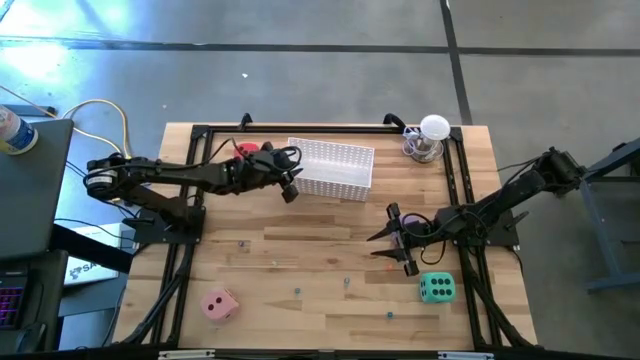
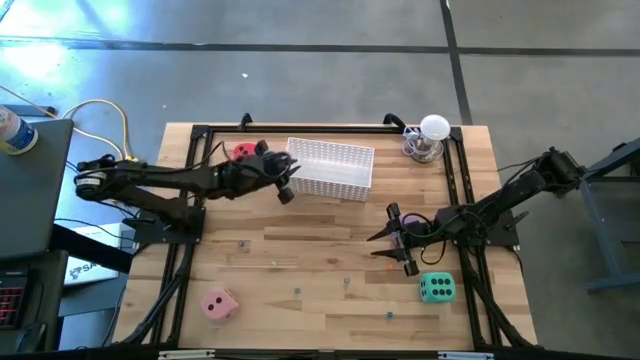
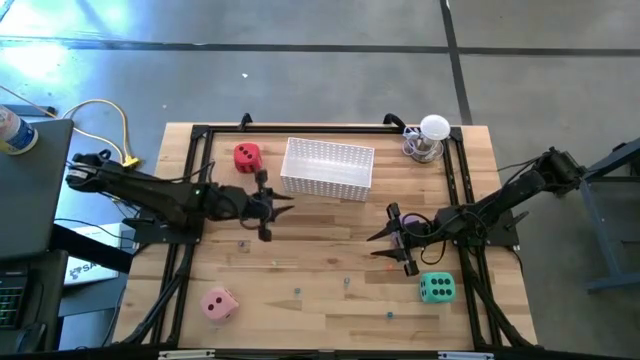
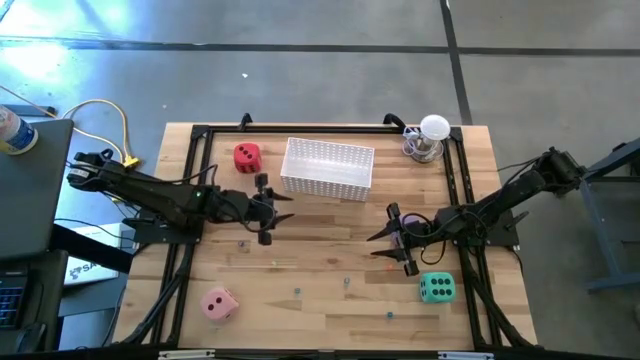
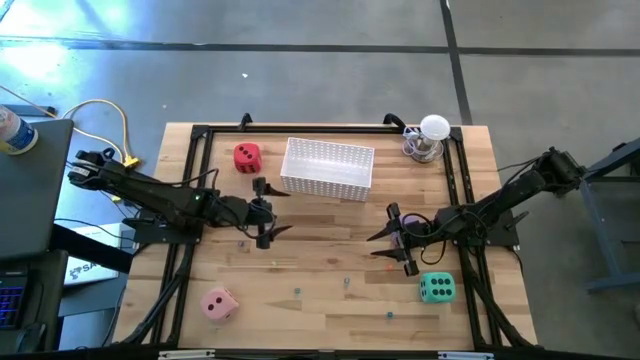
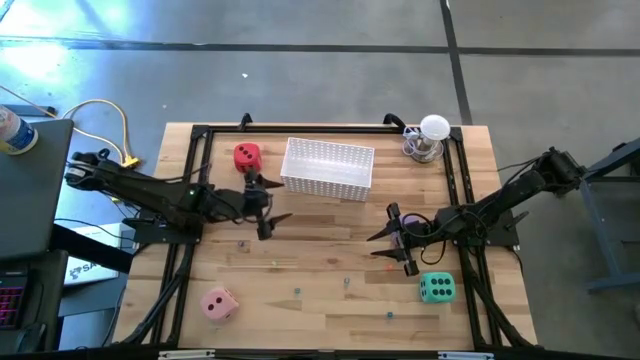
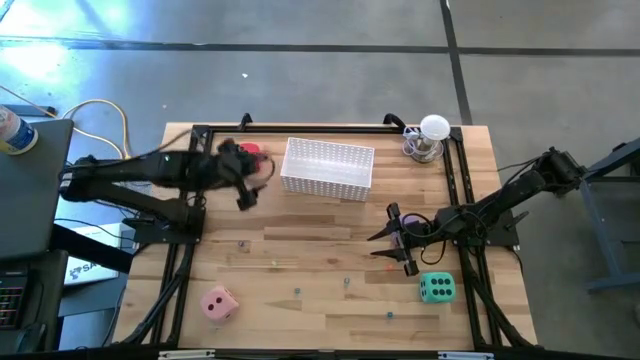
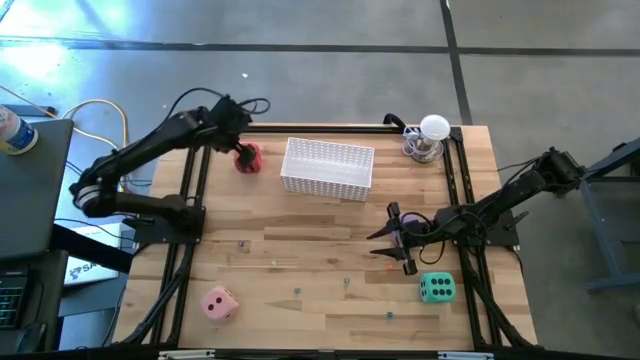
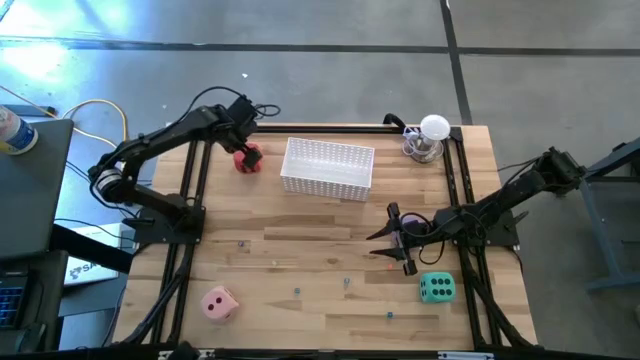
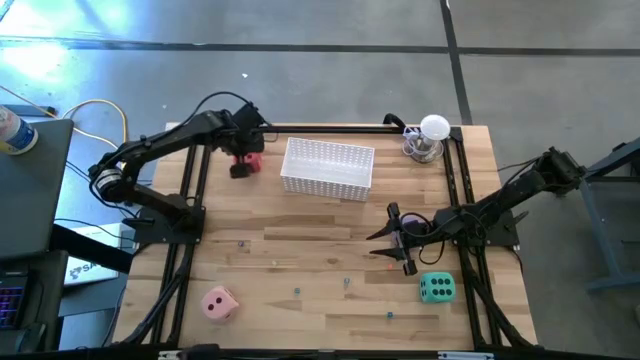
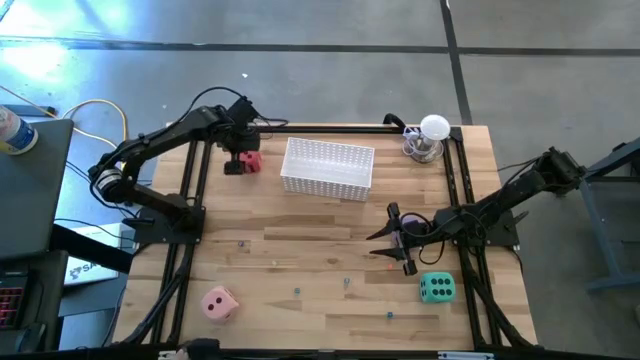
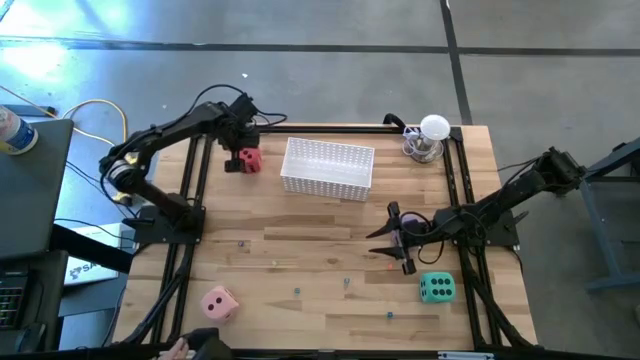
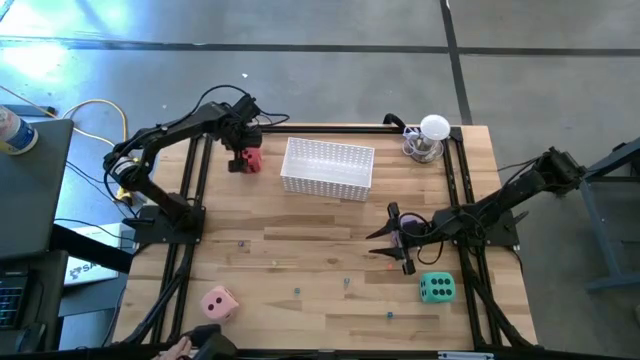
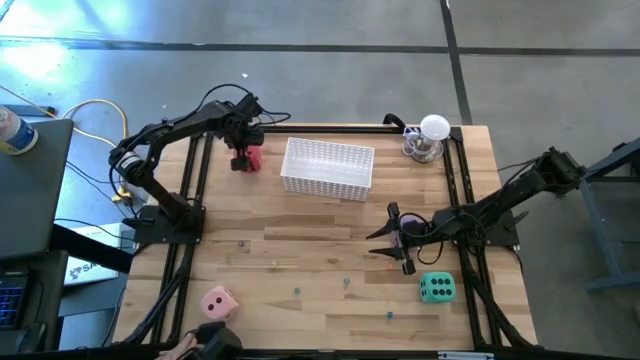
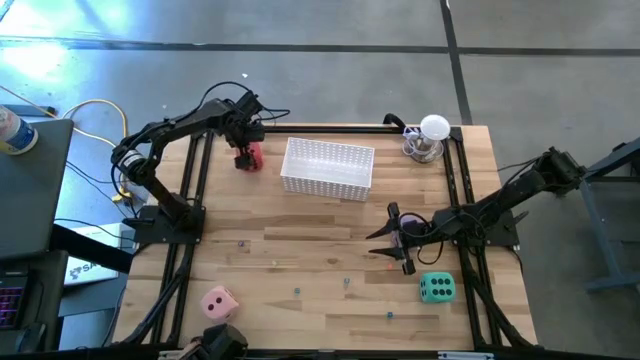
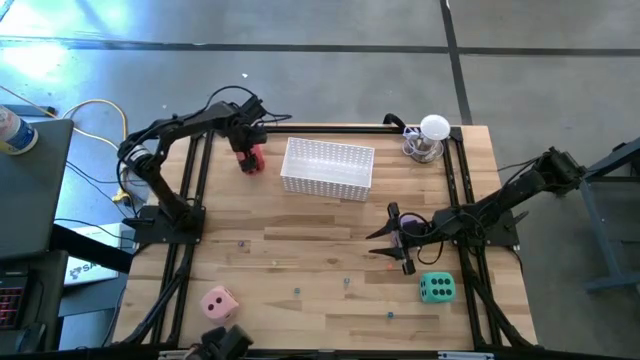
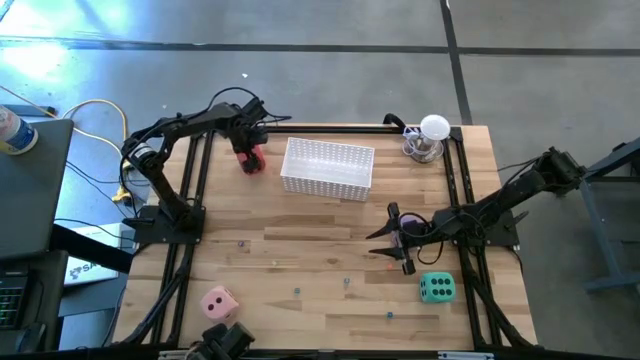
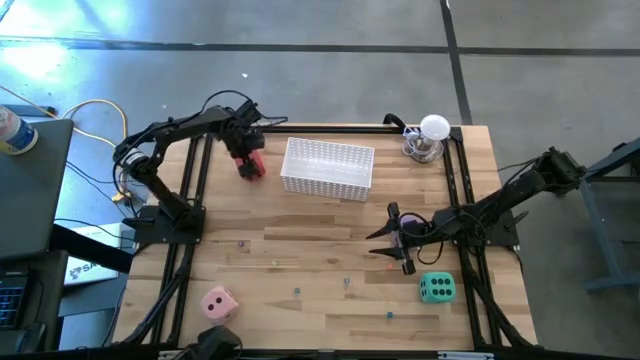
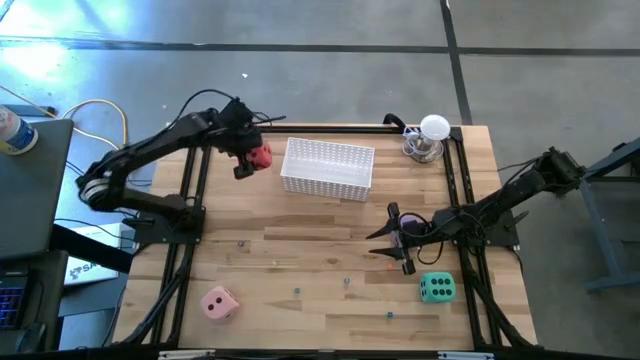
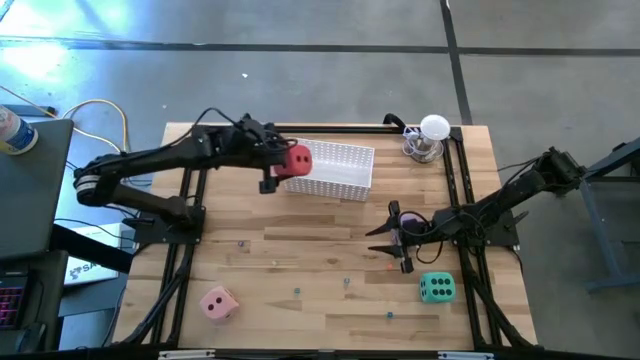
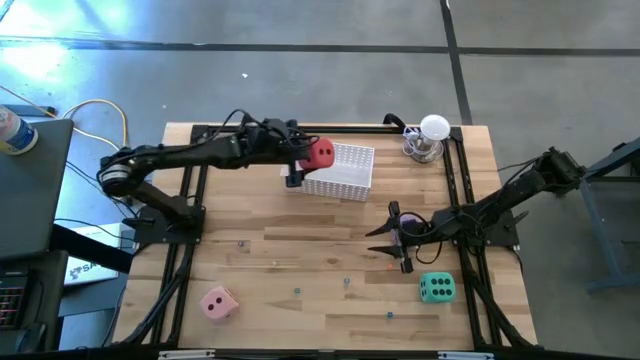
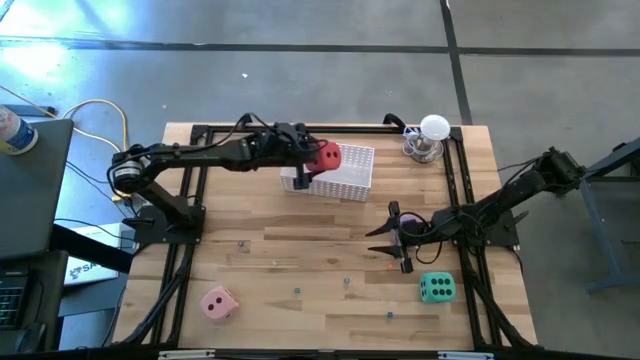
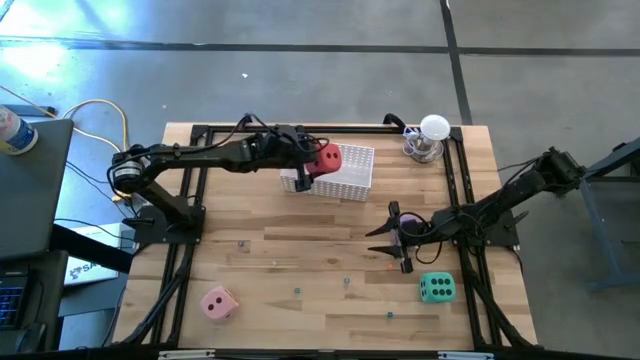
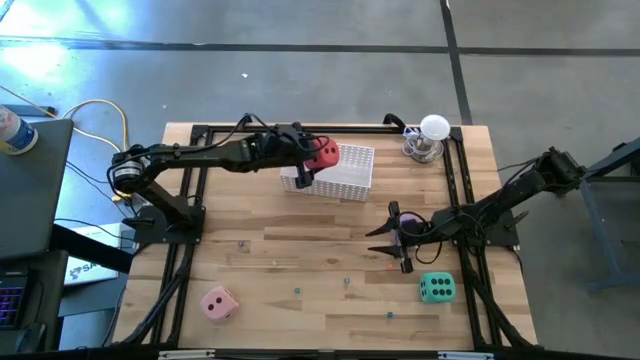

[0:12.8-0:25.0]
Task: Pick & Place Dice
Put the big red die into the white bin

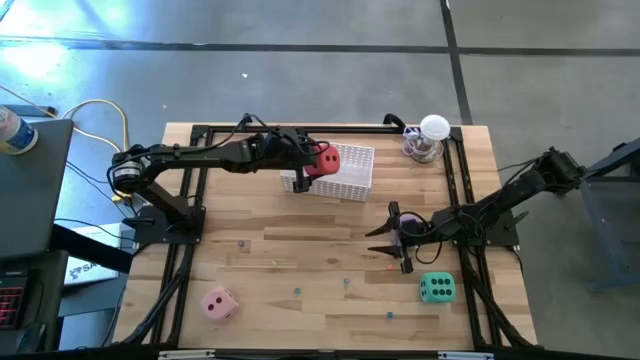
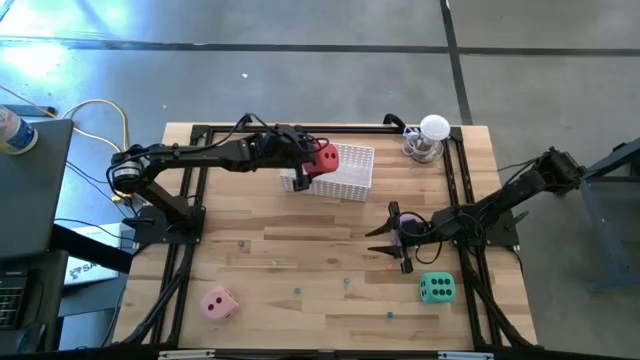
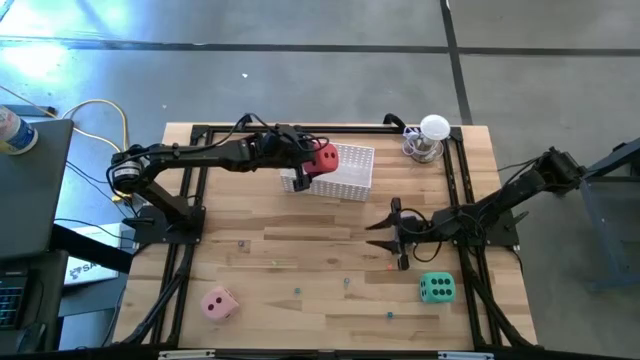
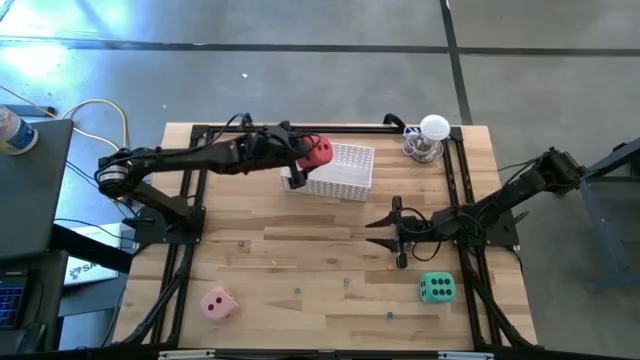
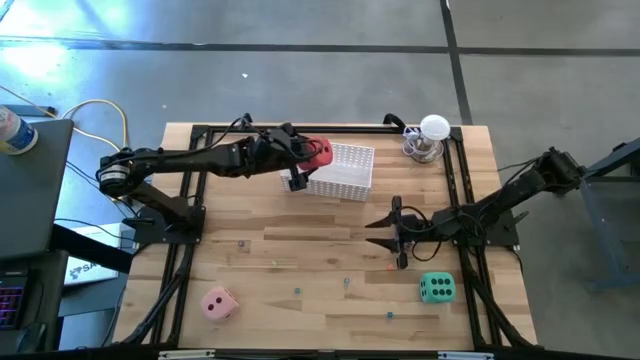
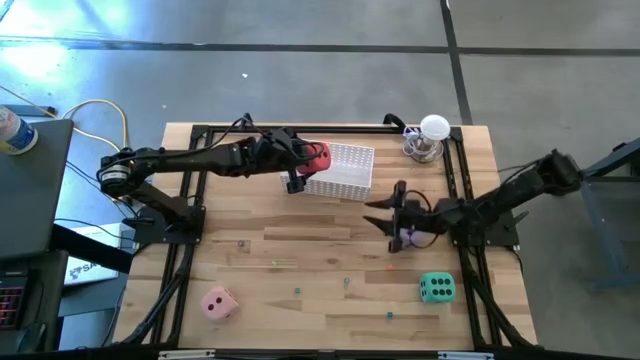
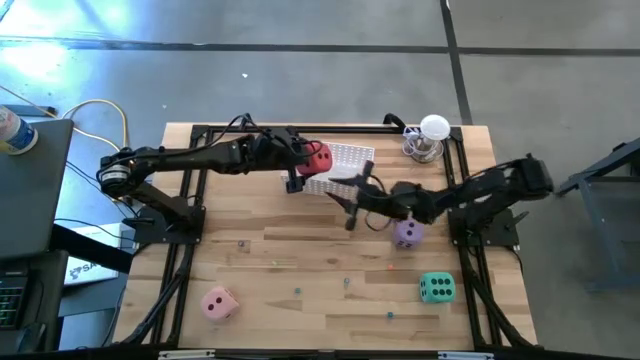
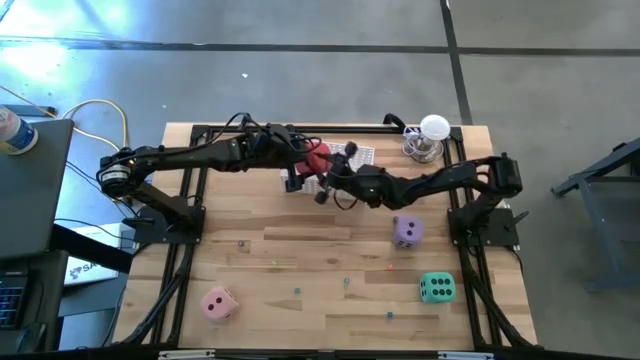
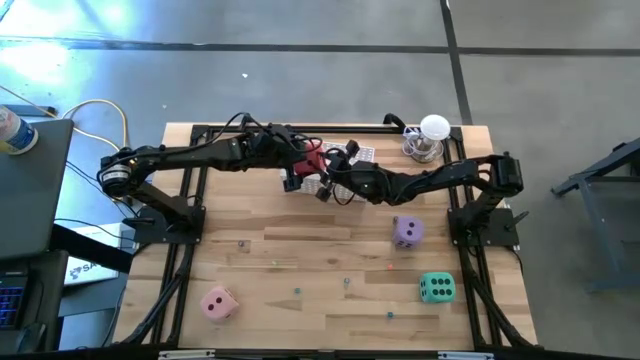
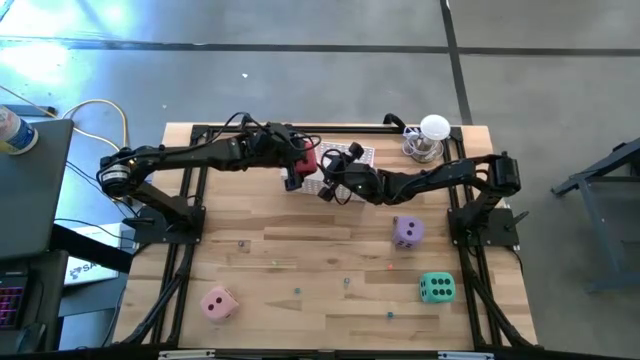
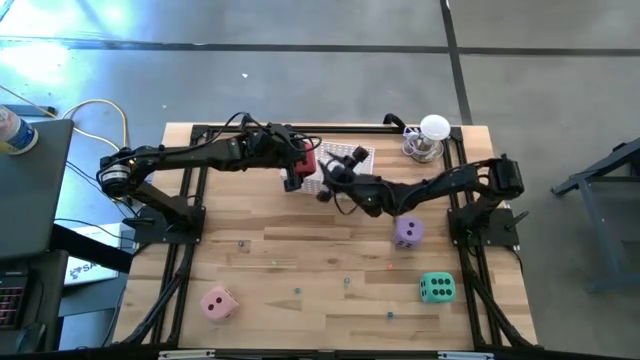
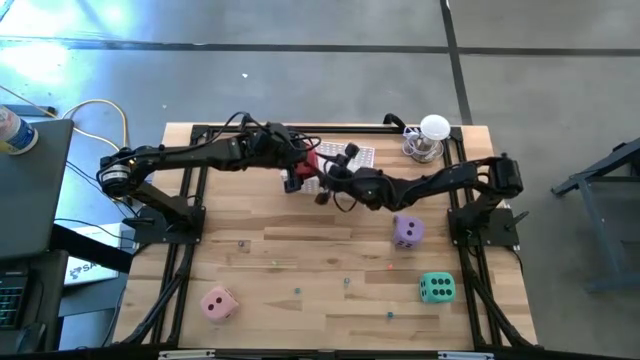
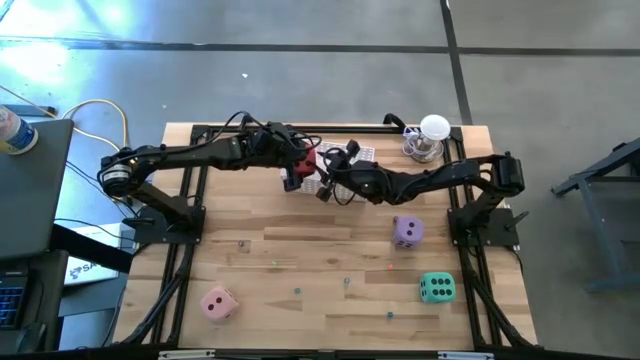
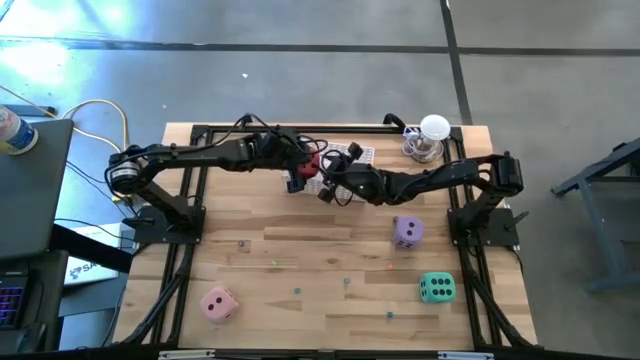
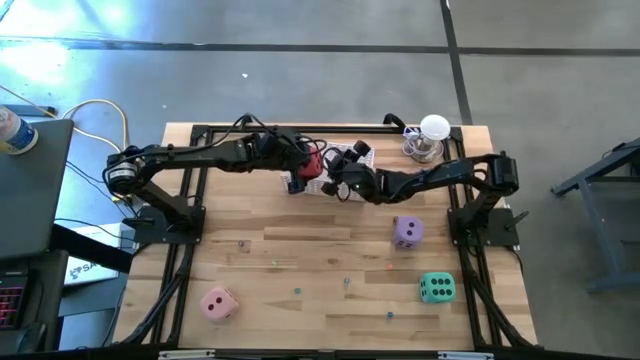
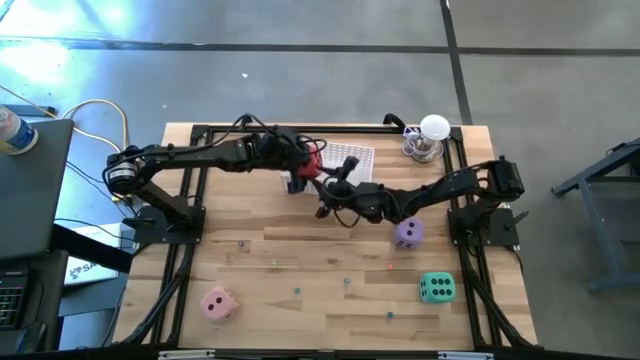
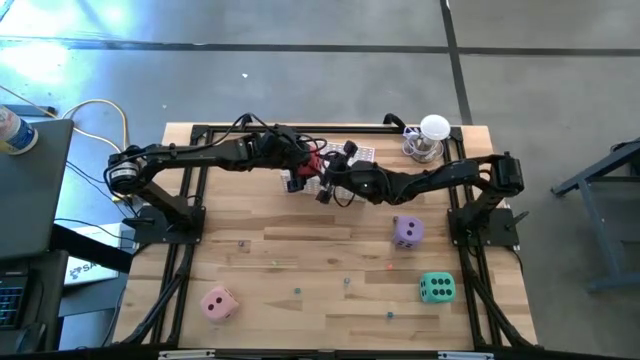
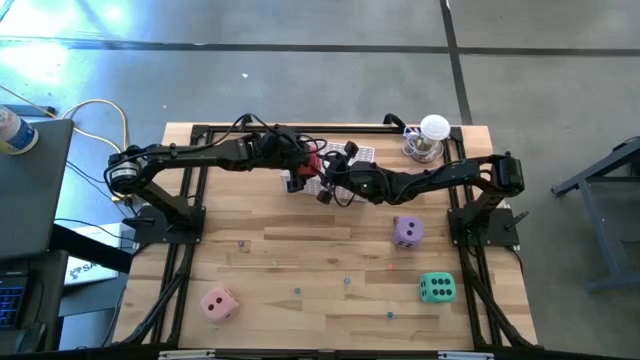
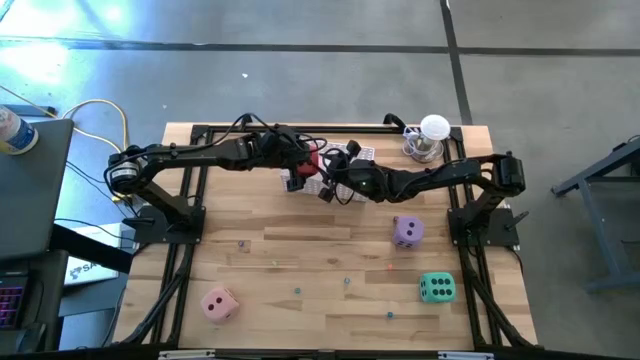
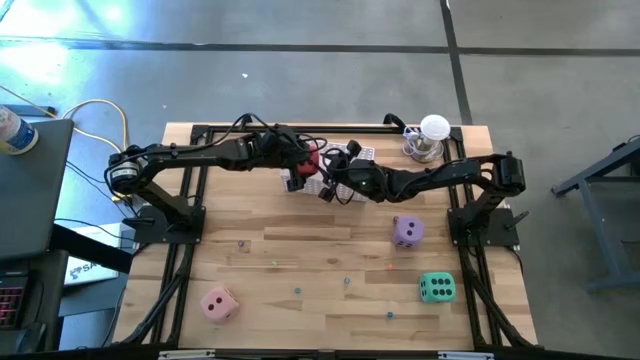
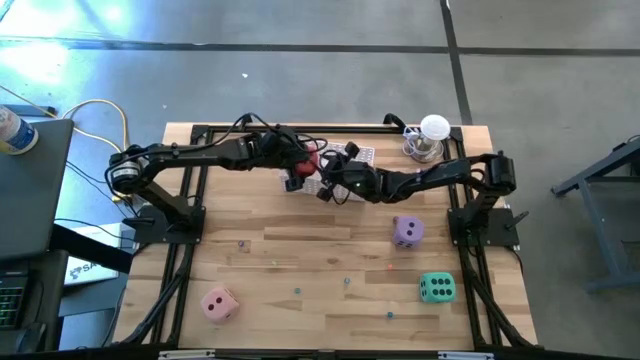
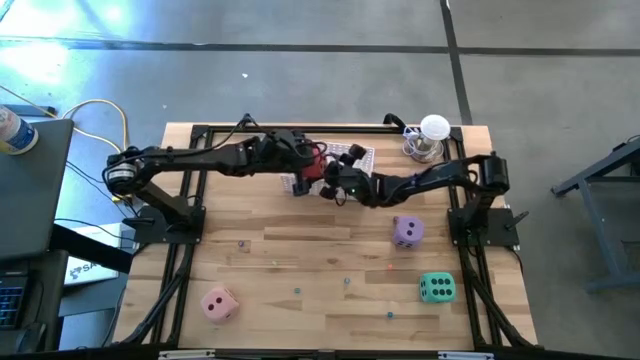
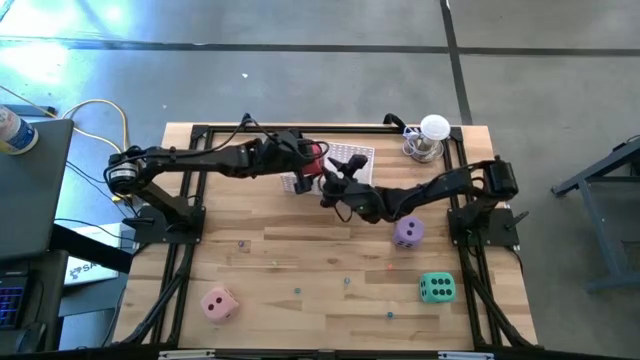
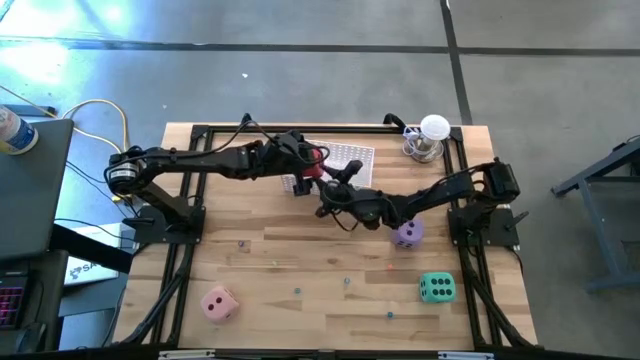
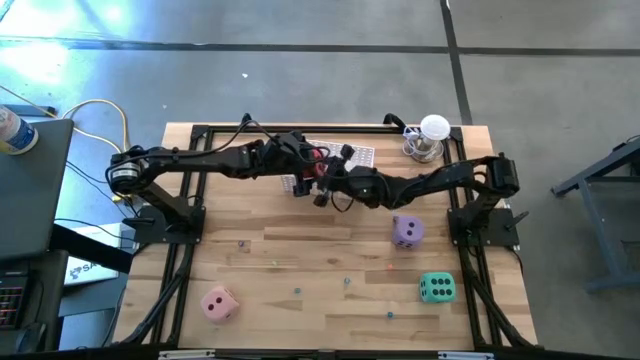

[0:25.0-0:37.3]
Put the big red die into the white bin
